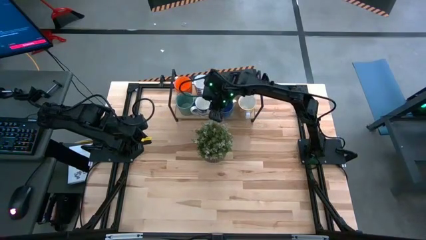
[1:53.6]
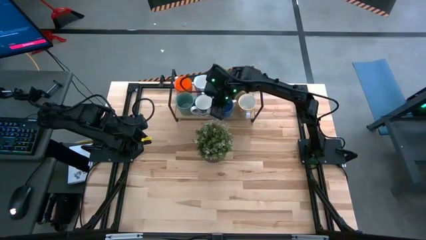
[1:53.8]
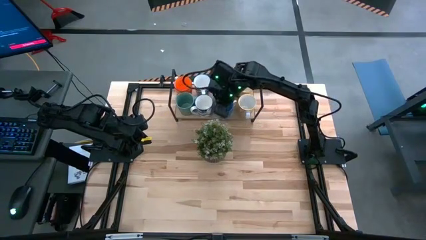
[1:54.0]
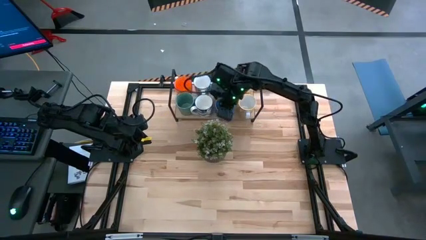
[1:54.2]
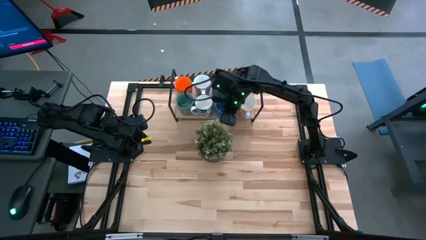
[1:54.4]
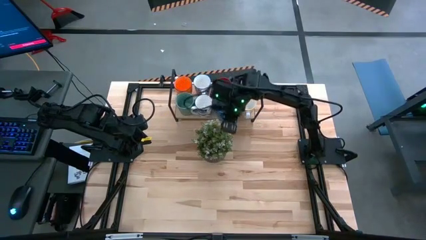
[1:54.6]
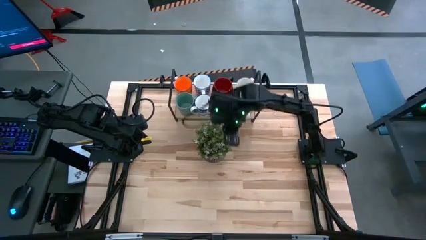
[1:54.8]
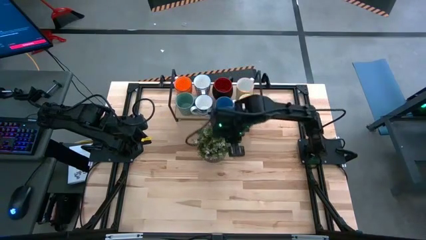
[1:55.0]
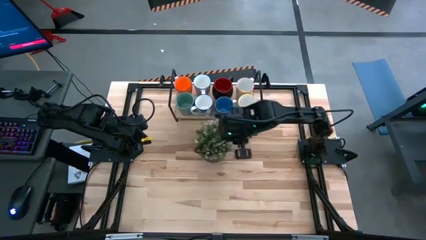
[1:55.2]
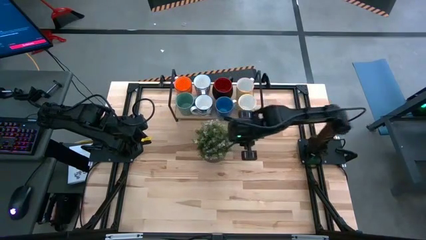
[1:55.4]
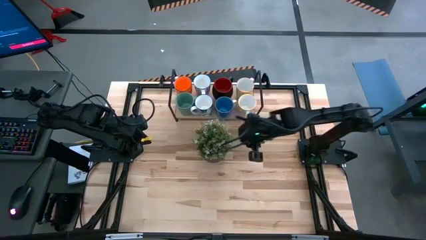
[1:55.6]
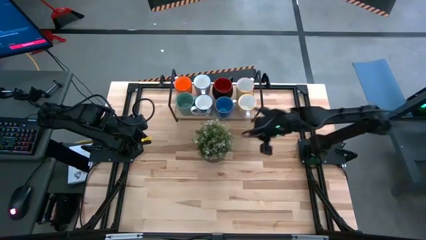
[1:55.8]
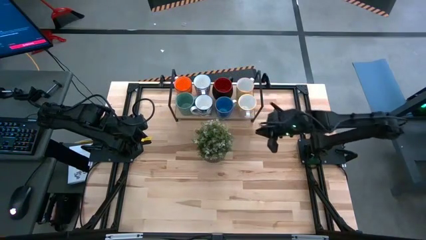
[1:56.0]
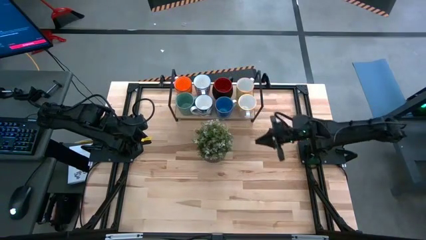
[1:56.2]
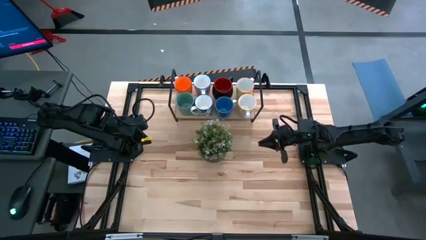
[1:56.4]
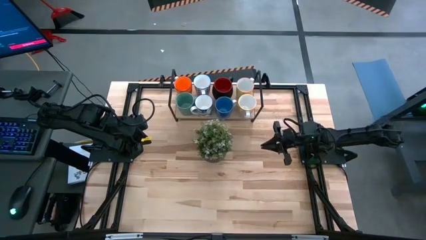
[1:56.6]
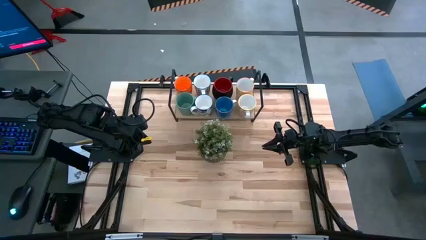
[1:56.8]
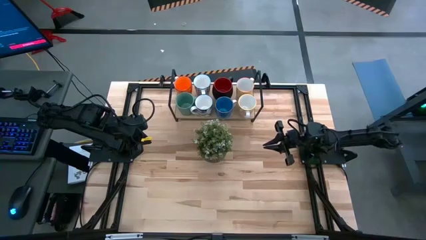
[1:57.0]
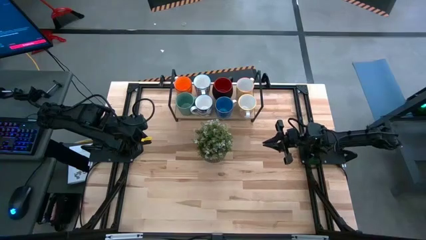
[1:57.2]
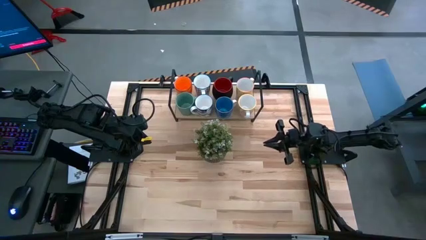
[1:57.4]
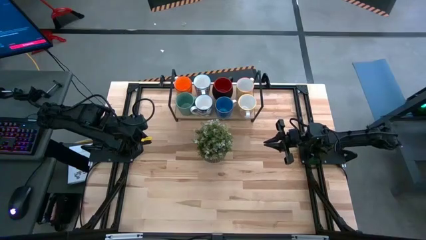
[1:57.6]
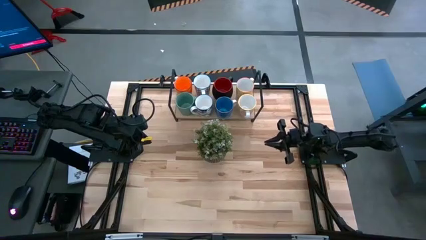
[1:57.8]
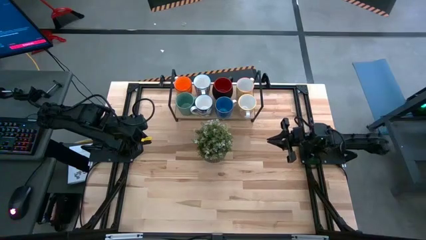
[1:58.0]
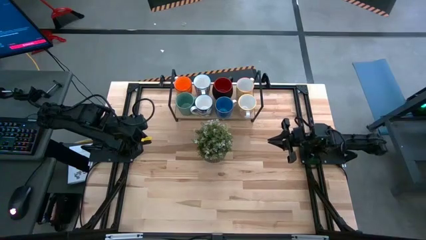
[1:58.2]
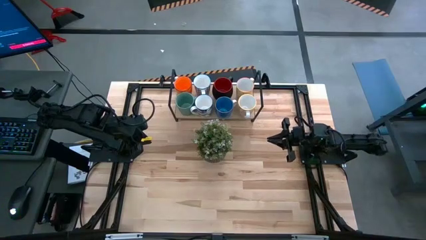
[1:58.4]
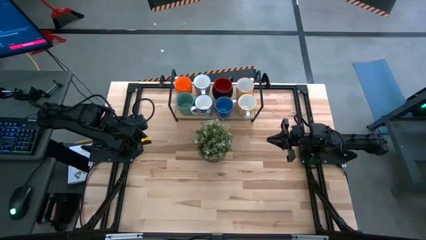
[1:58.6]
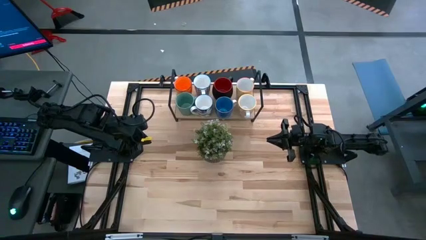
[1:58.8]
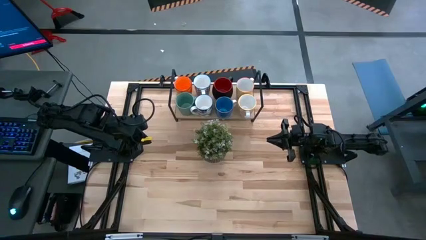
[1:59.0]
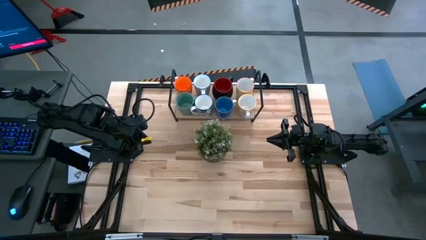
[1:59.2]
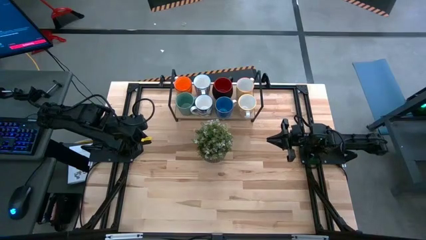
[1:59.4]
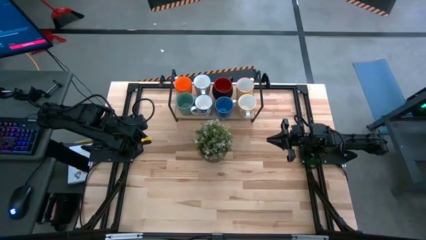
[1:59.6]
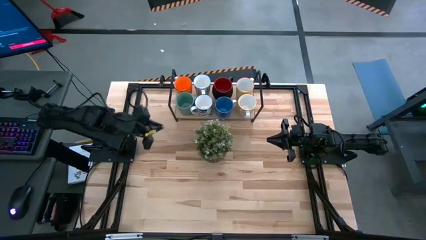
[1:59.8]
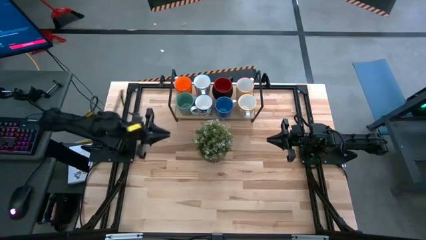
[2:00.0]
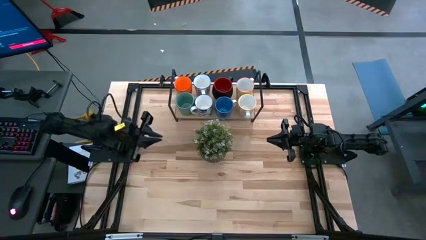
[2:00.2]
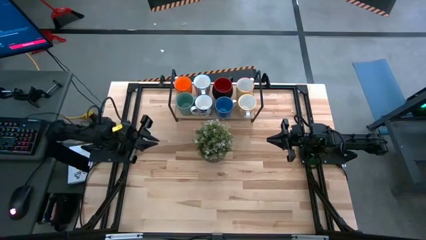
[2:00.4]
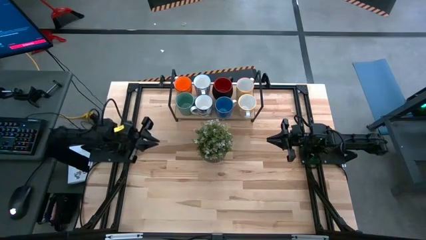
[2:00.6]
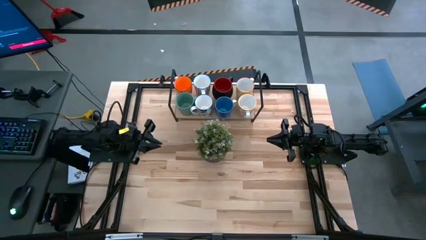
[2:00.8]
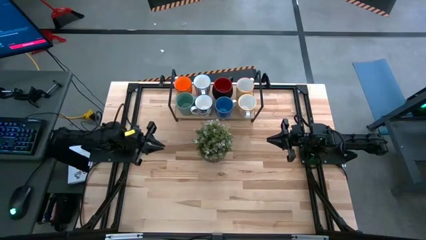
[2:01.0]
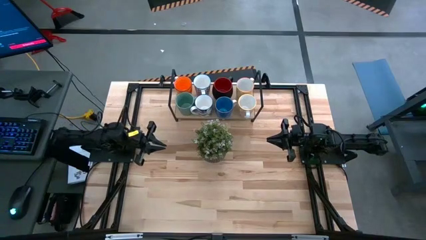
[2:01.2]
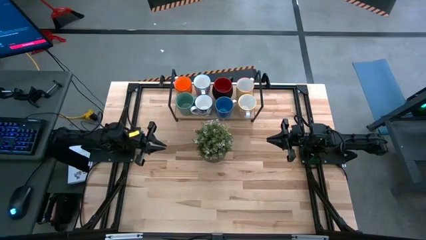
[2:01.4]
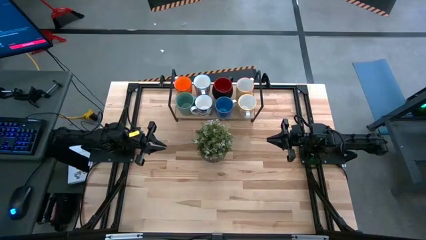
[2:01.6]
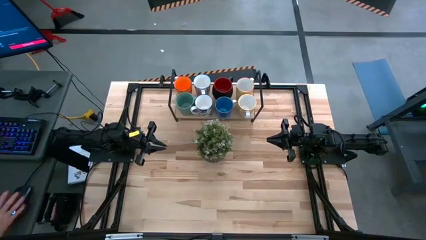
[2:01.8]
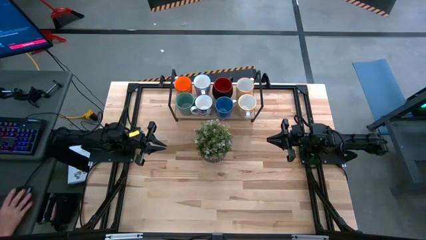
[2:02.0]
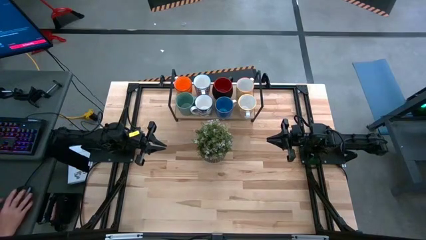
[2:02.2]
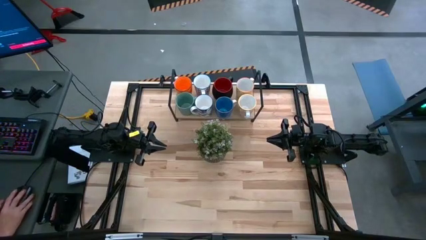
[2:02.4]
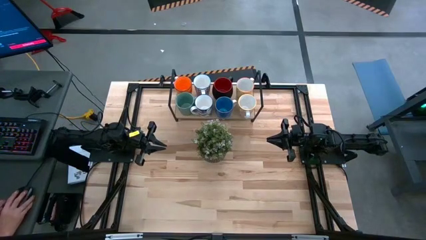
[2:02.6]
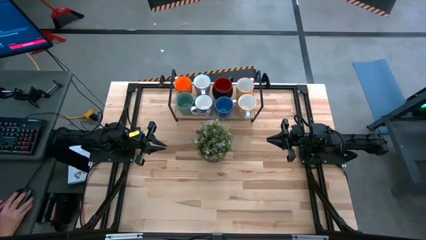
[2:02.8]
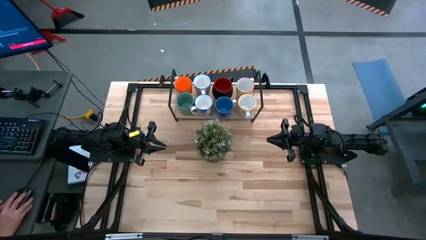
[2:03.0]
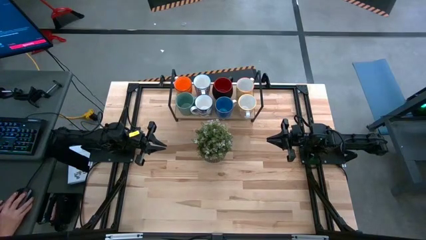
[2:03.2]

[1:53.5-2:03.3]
Task: Place coffee mugs
Return to Home Position

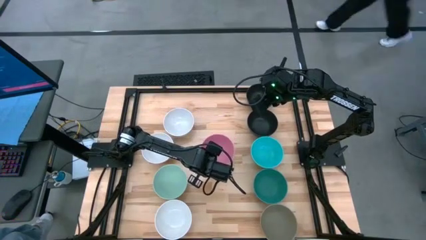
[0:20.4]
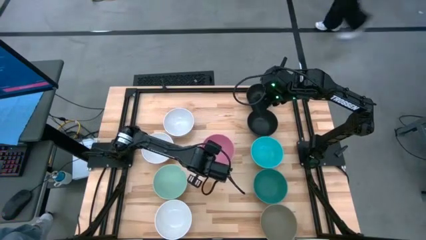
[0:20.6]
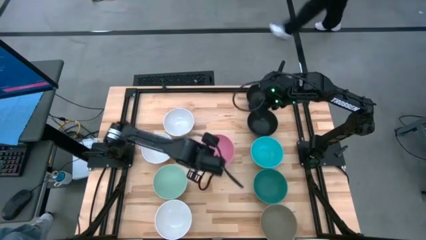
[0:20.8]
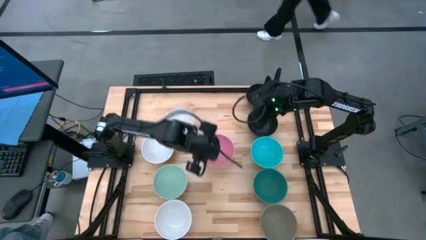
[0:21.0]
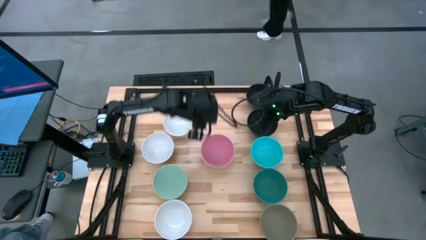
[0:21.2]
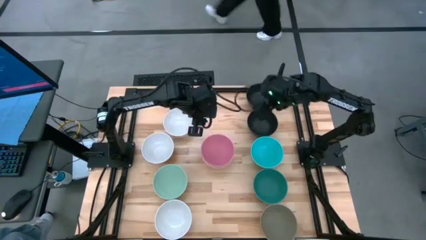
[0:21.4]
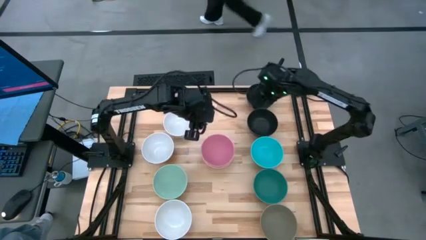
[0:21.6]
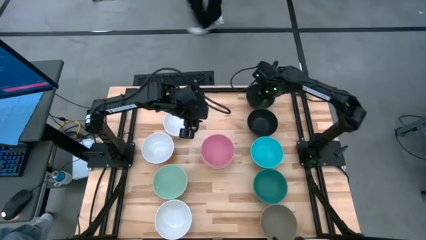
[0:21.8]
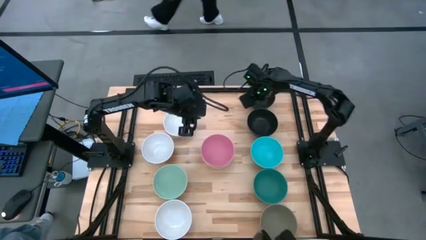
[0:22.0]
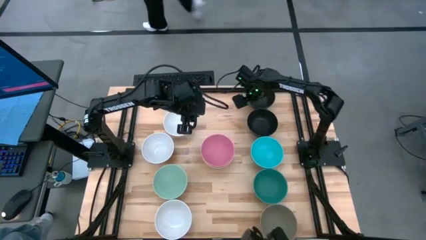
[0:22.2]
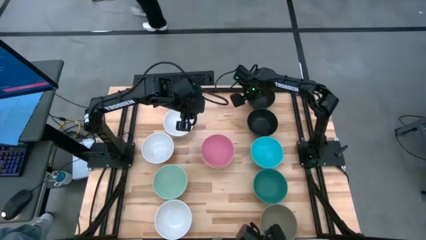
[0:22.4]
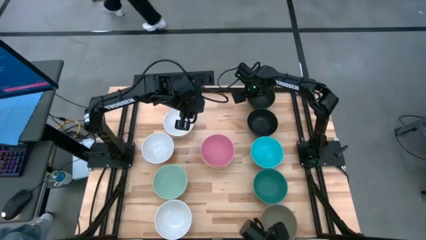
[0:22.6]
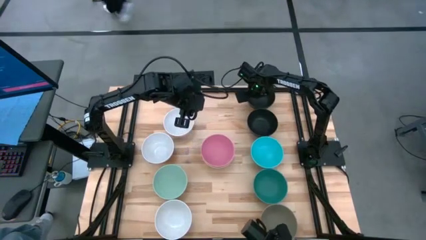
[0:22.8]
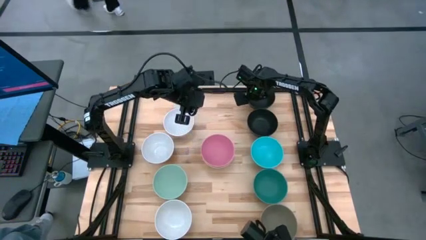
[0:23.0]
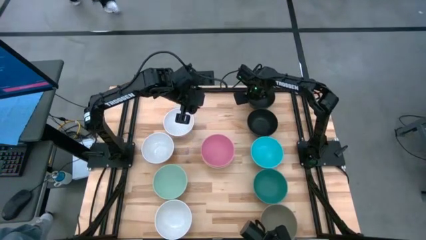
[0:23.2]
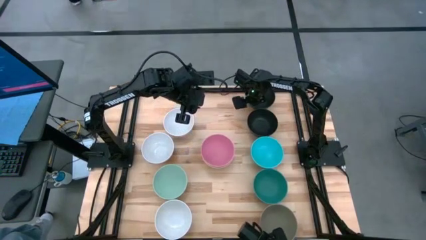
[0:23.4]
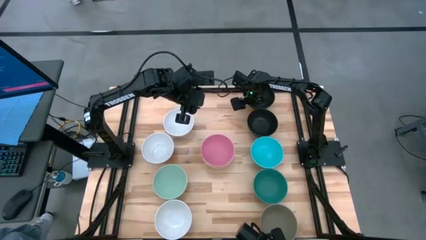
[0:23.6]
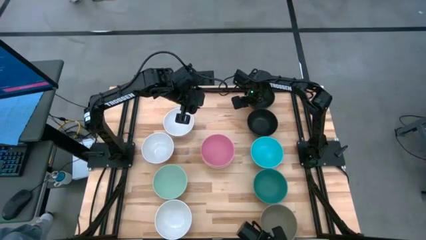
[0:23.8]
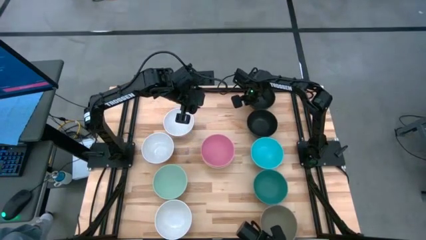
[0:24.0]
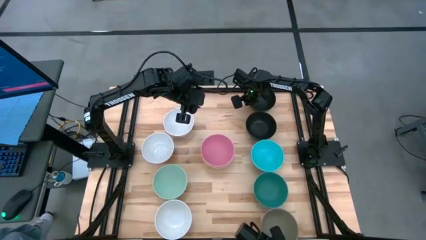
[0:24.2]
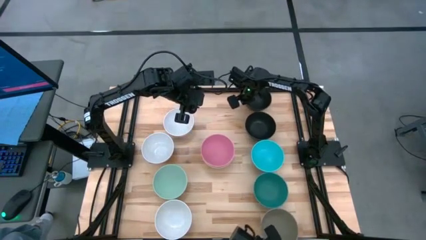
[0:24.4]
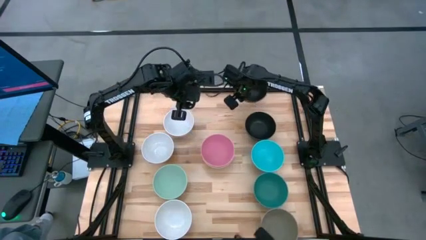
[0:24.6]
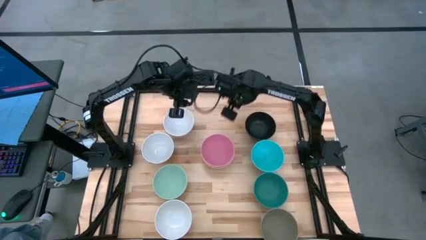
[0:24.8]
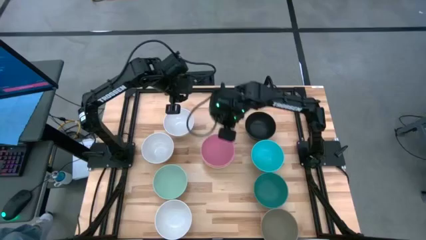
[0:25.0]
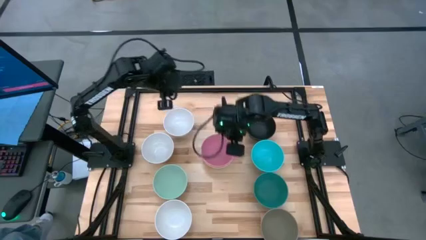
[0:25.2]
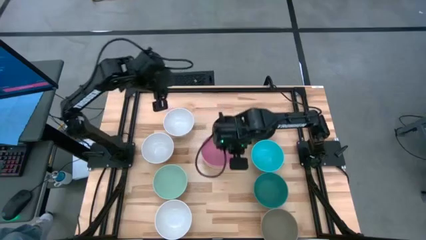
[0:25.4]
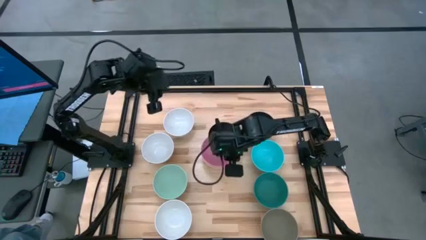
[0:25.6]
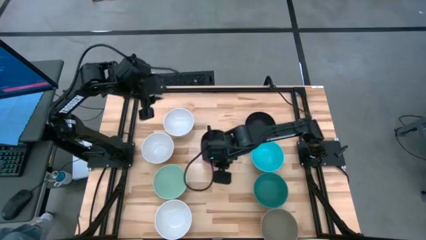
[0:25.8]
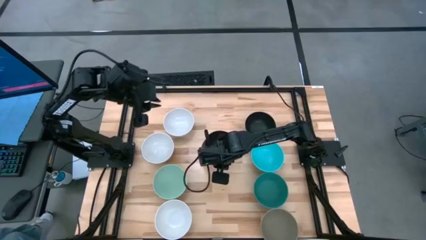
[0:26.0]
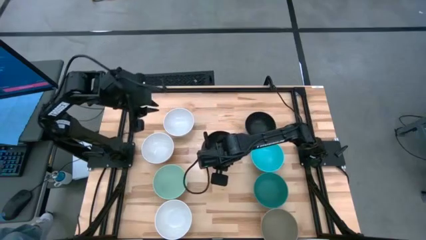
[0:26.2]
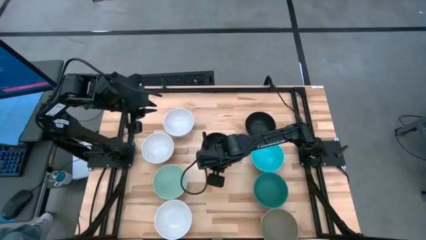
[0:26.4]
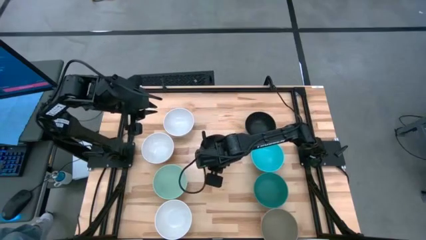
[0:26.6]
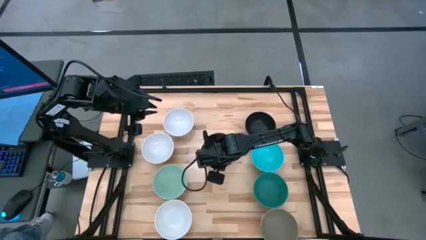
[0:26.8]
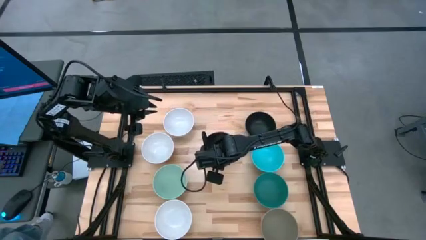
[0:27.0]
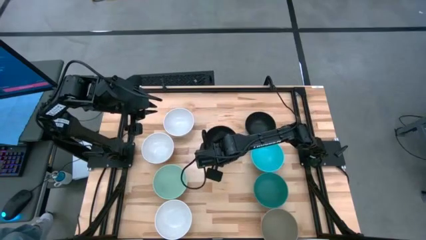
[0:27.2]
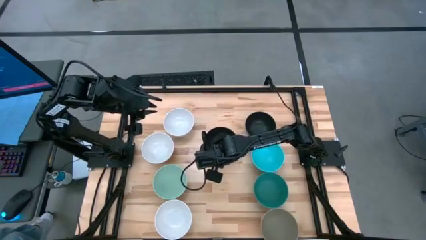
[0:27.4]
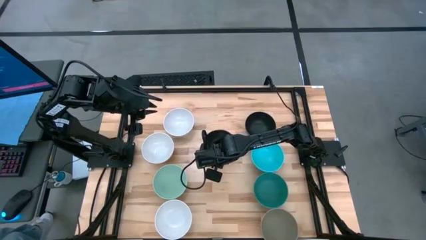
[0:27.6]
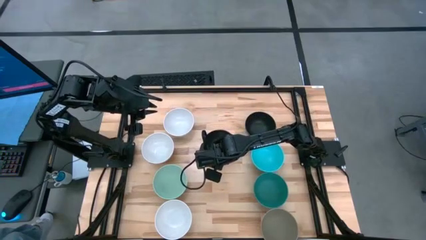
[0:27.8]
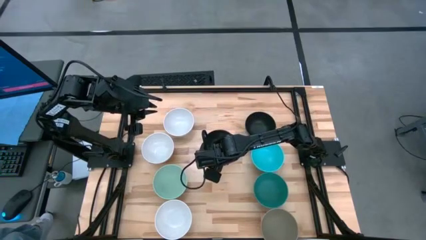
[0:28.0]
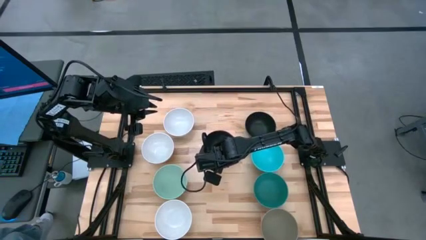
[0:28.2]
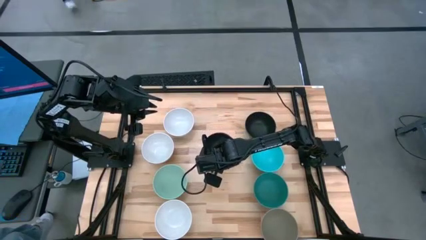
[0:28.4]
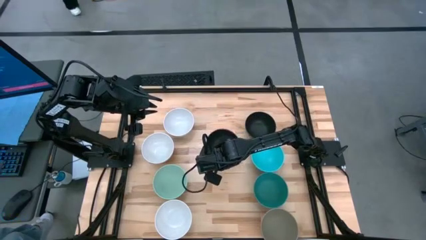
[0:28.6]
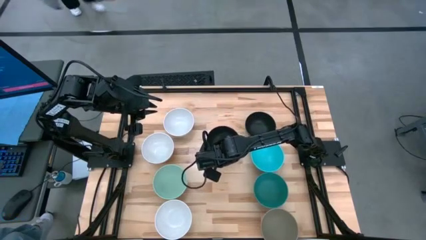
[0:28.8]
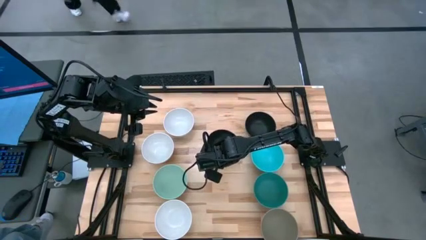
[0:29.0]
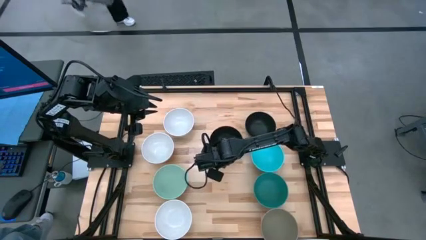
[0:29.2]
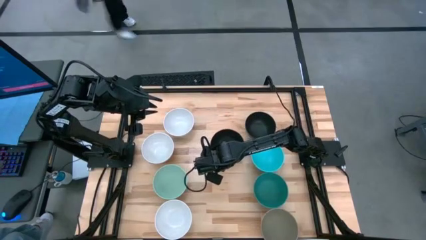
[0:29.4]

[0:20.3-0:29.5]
Task: Nest bowls inside each other
Stack the black bowl on the pink bowl
